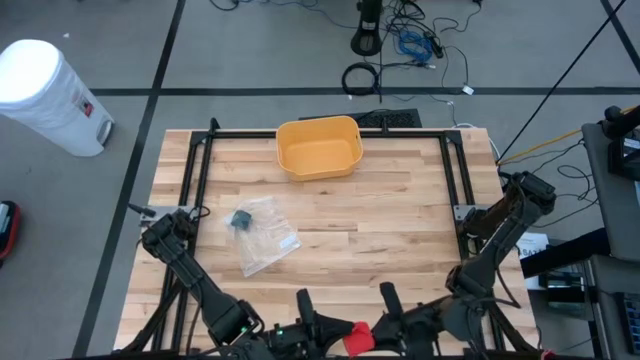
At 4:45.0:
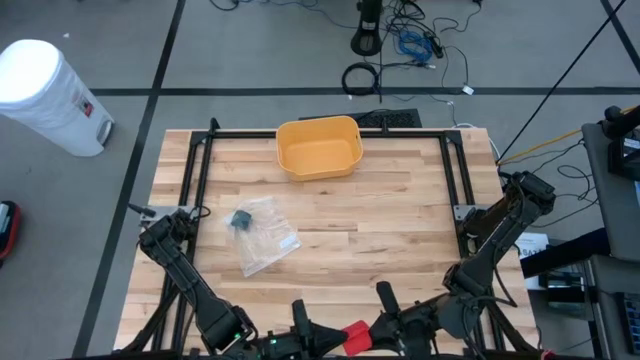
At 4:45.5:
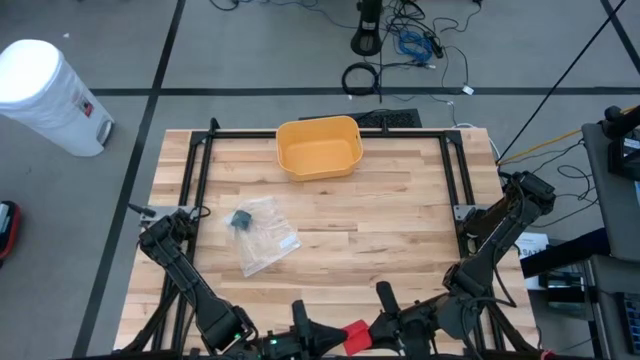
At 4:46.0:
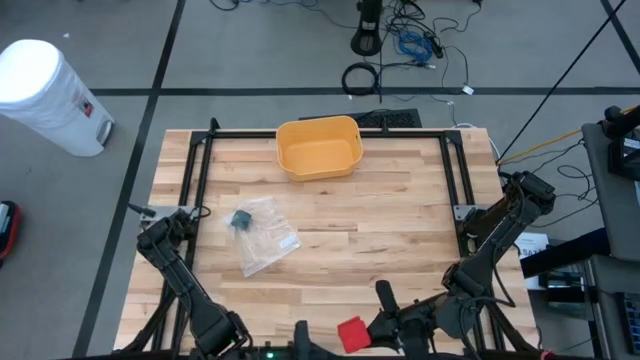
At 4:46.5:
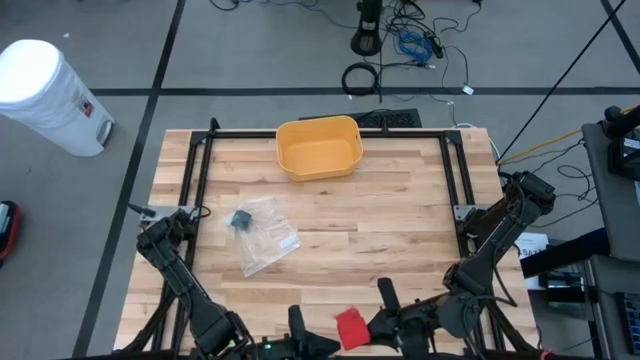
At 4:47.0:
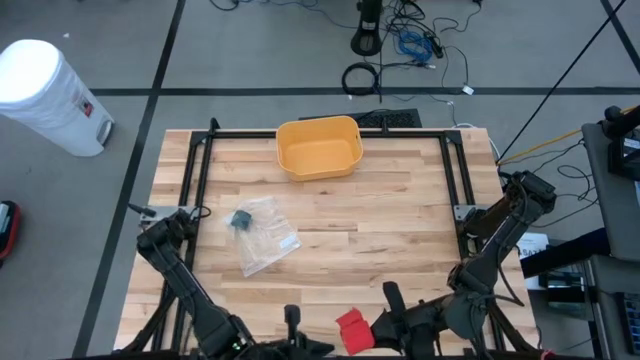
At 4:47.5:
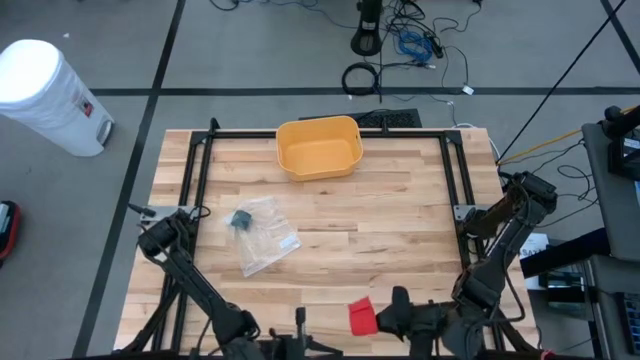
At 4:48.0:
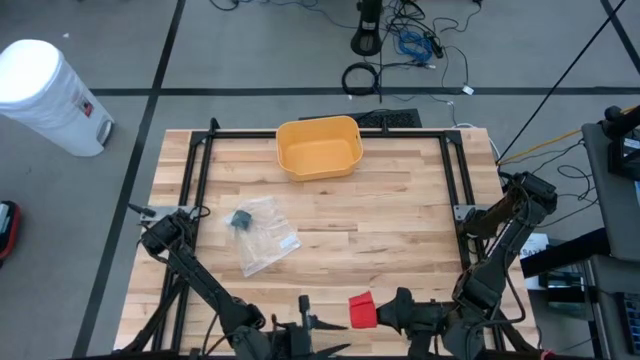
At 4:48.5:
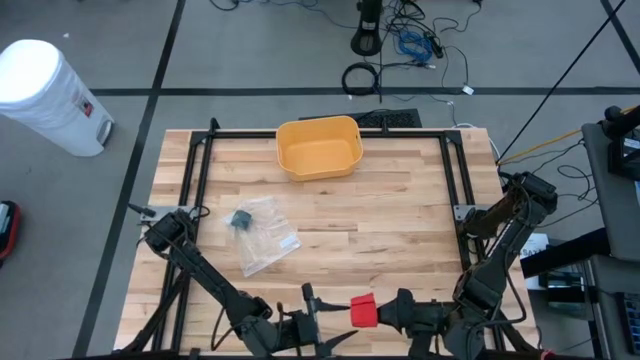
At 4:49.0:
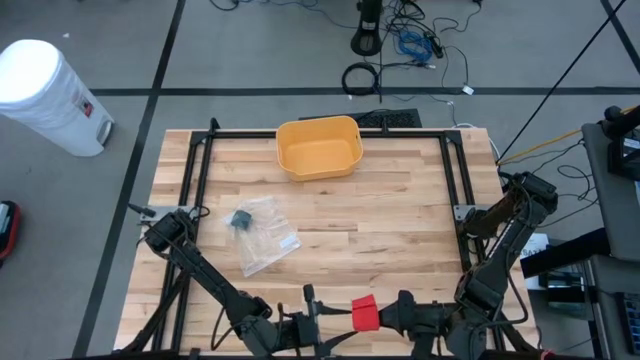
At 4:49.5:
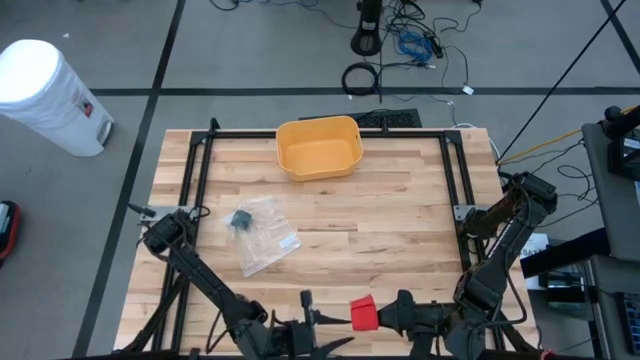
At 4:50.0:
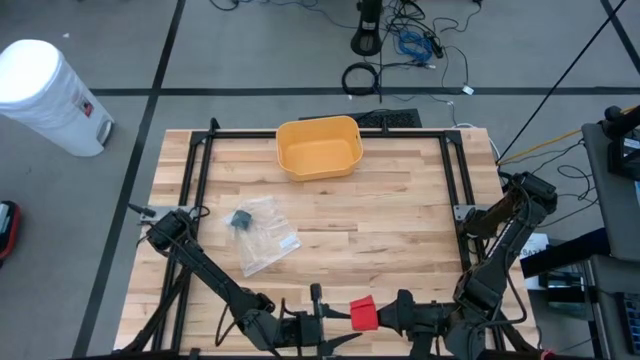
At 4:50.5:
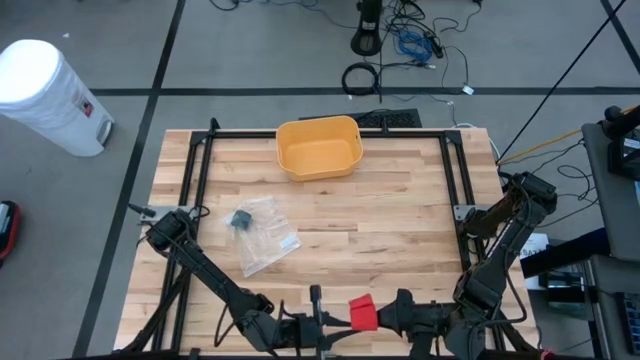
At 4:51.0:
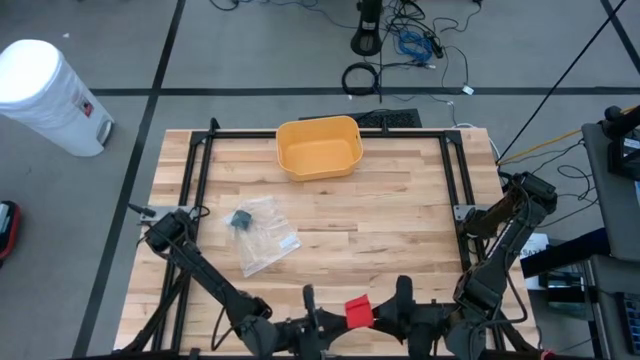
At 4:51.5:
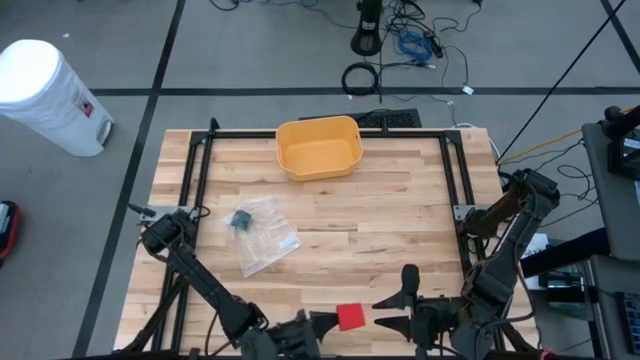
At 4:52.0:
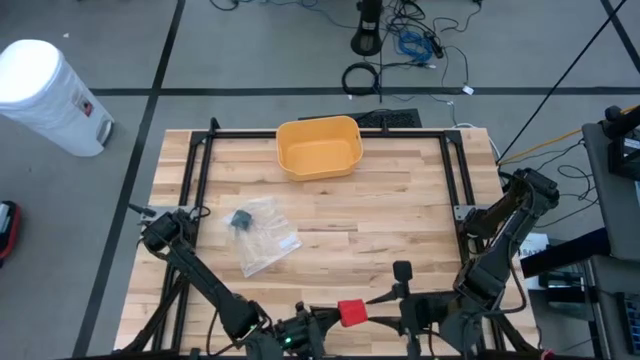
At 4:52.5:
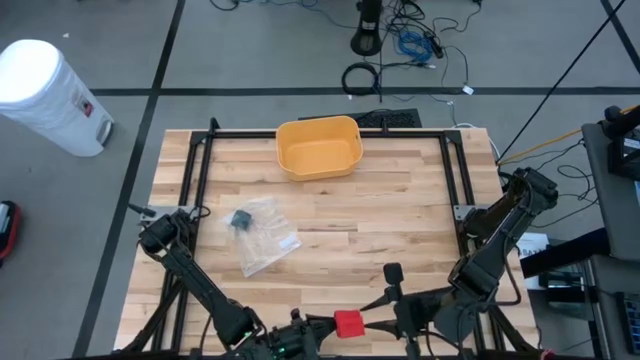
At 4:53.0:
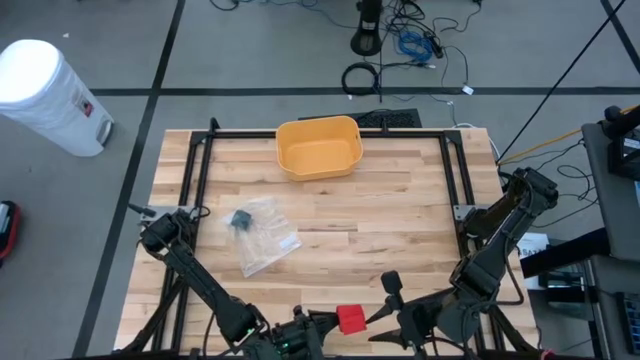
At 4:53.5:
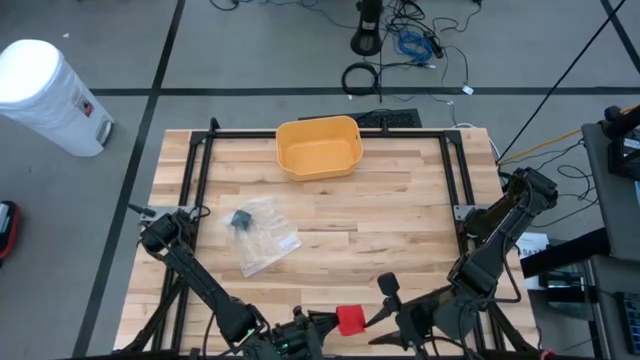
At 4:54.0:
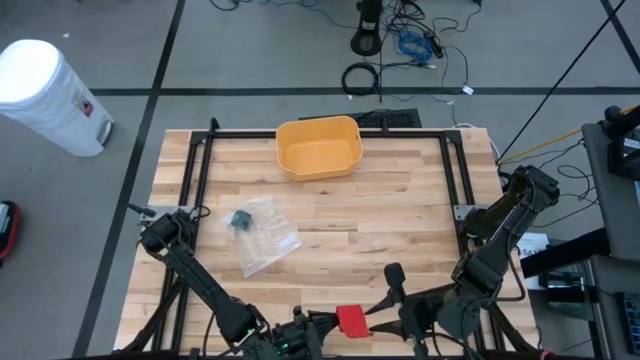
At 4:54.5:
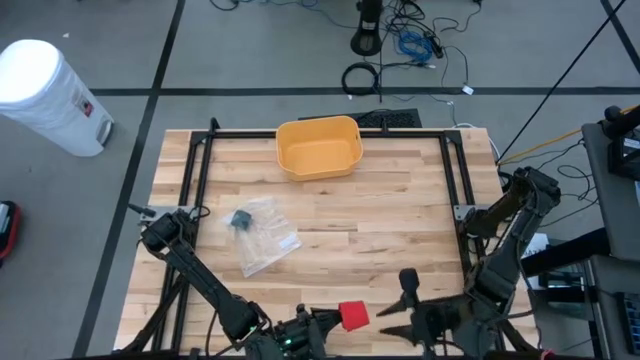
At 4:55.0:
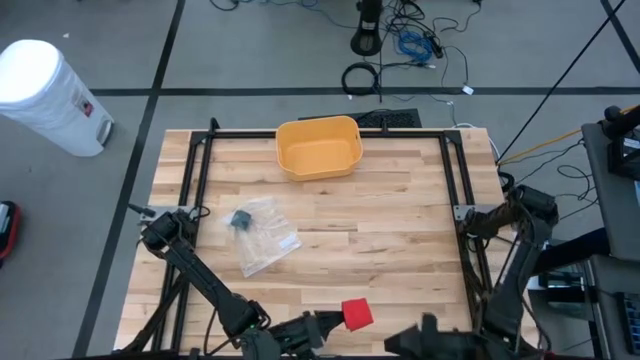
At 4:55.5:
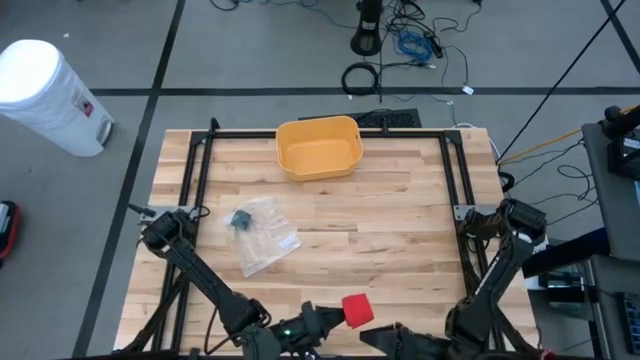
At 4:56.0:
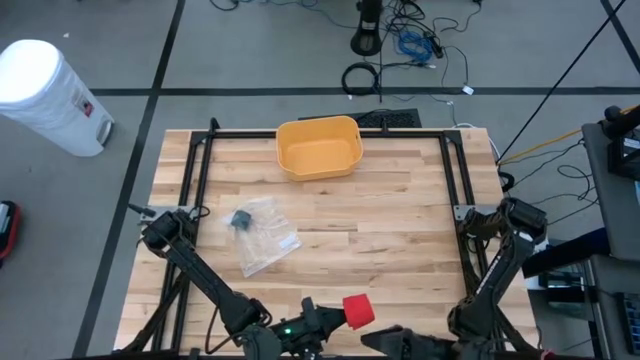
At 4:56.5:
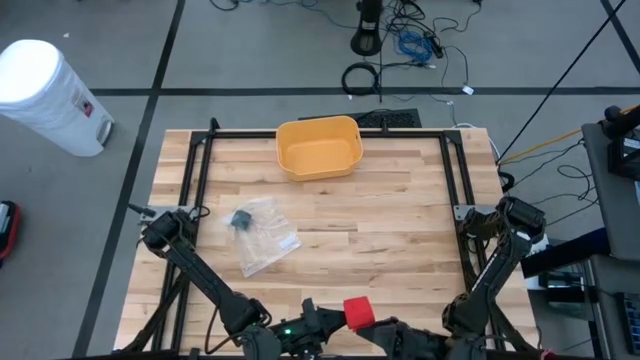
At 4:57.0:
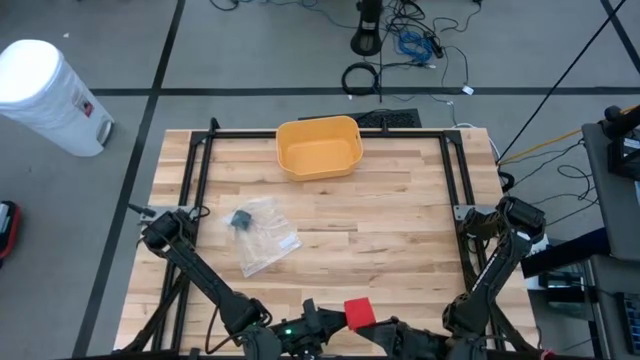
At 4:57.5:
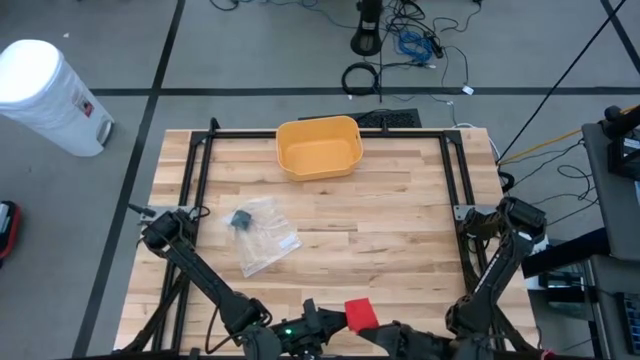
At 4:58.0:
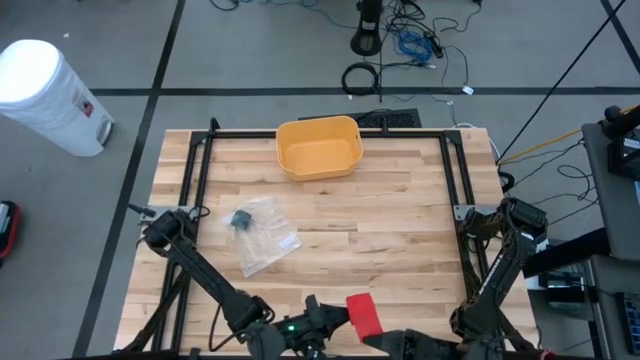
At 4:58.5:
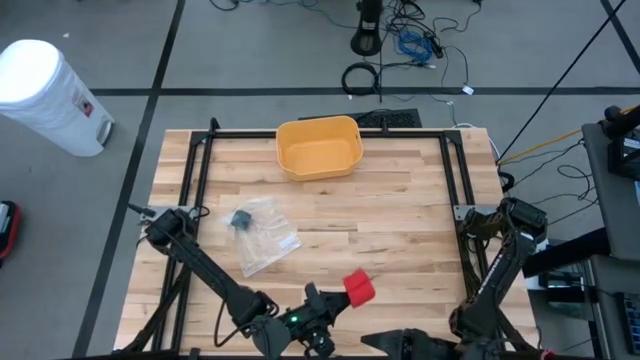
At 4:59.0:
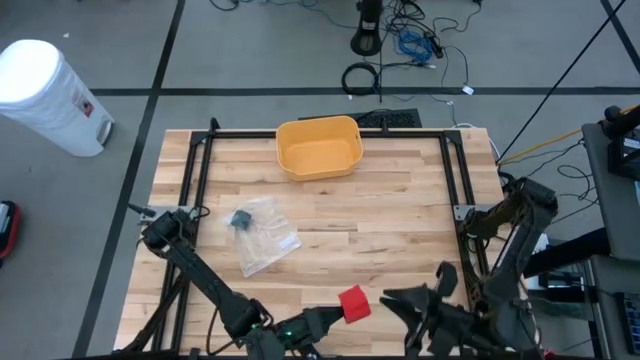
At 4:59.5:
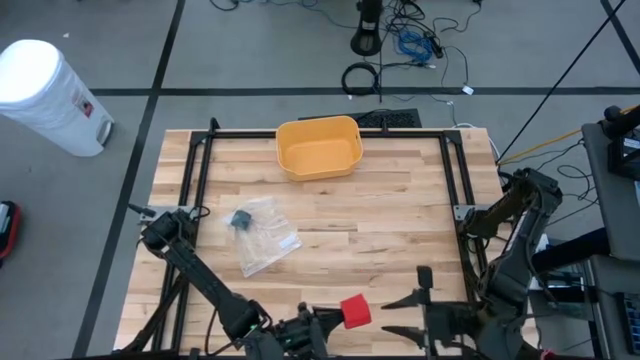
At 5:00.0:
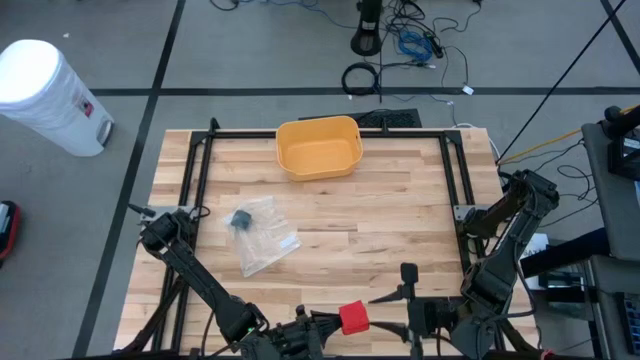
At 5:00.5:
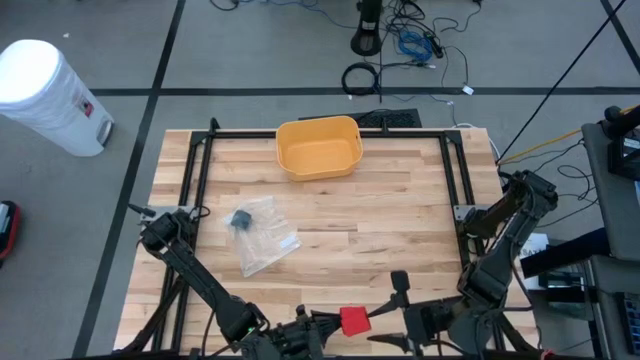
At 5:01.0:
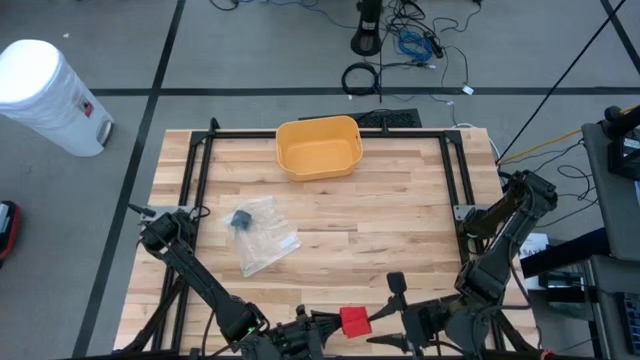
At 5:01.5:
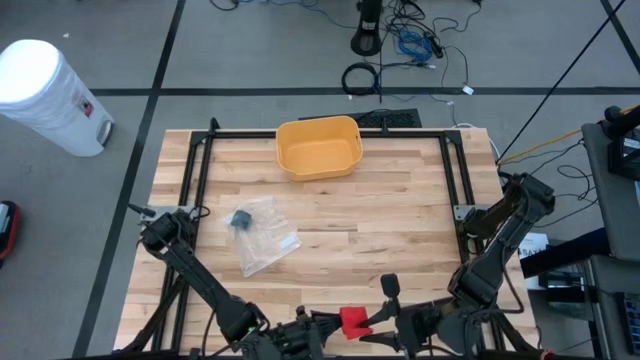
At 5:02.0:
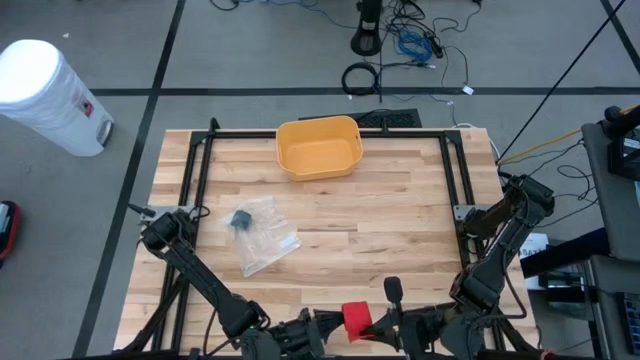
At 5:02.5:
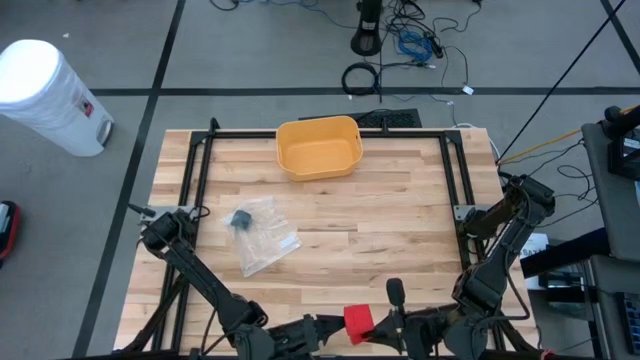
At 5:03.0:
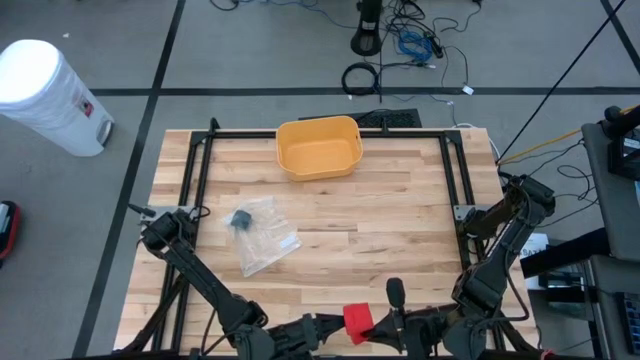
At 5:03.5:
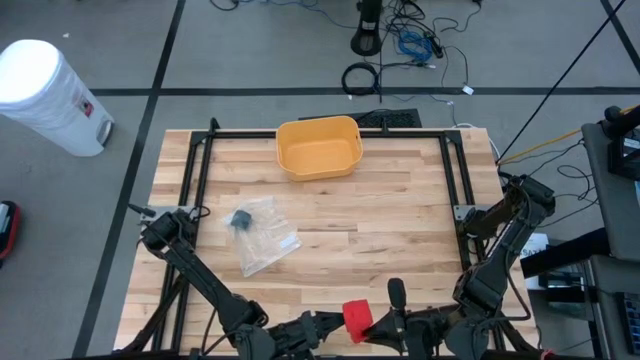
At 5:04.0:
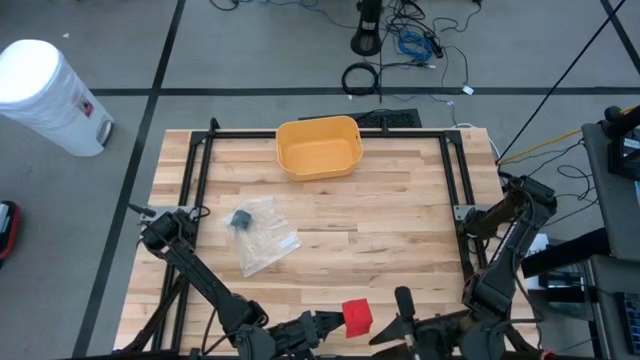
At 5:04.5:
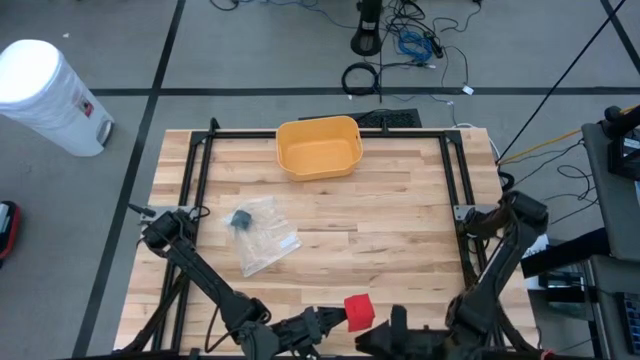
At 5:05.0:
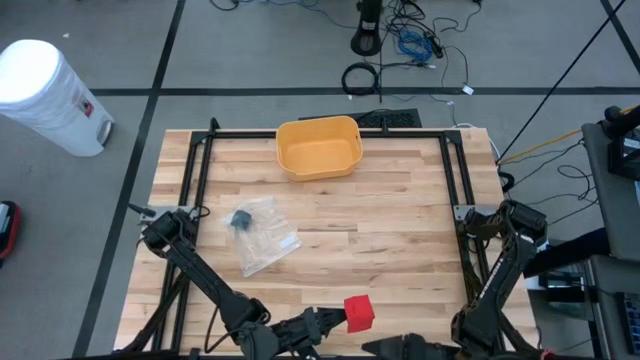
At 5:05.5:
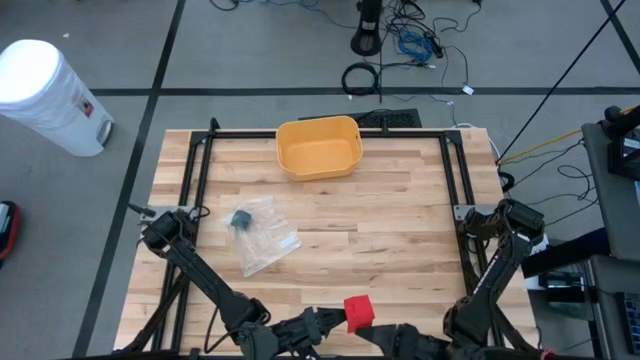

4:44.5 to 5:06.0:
Task: Roll bandage
Roll the red bandage

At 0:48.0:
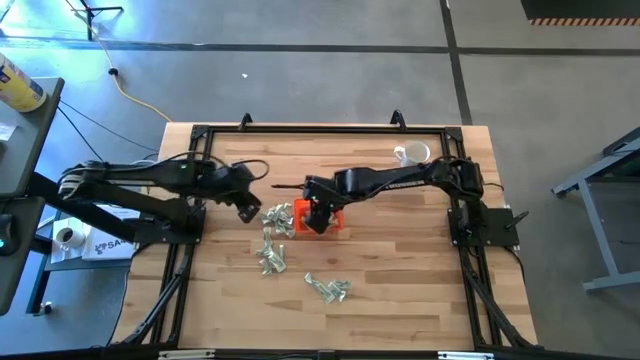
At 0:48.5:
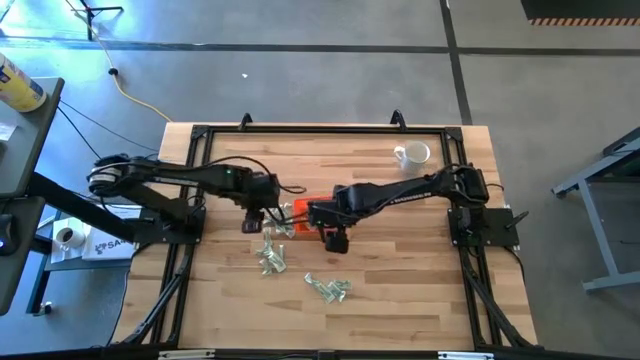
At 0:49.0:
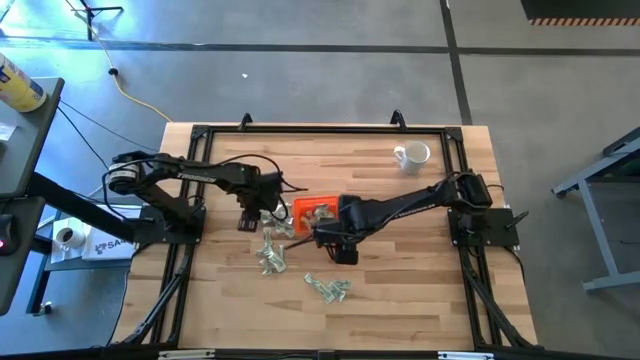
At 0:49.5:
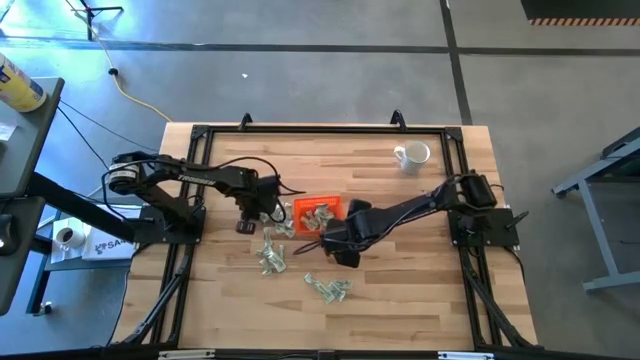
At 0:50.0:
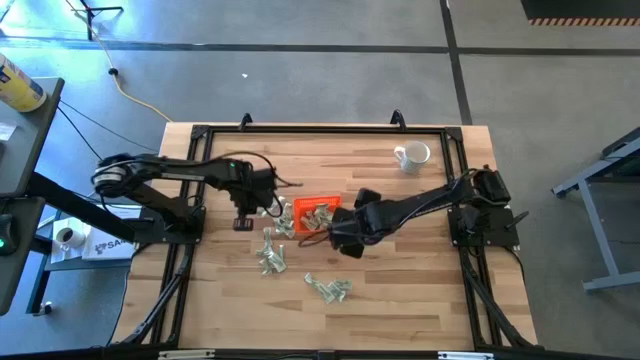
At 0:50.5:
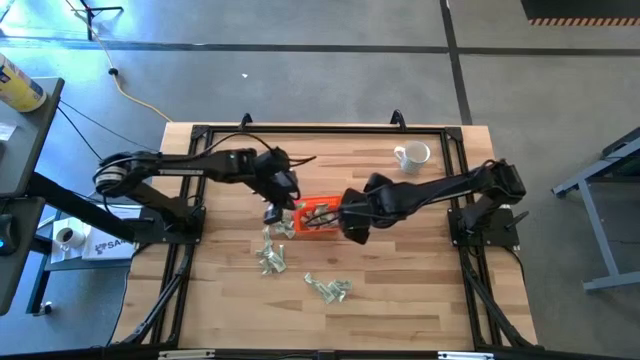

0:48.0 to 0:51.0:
Task: Pick and place Stevia / Truvia into bins
Put the stevia packet into the orange bin
